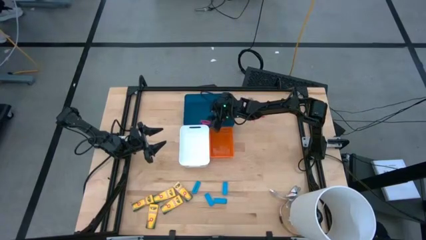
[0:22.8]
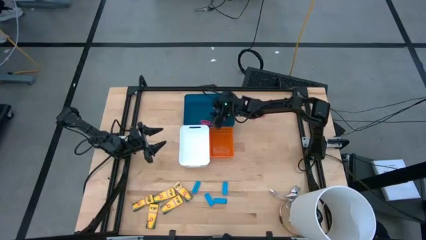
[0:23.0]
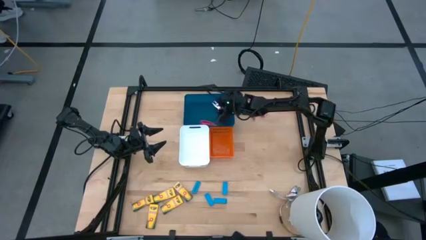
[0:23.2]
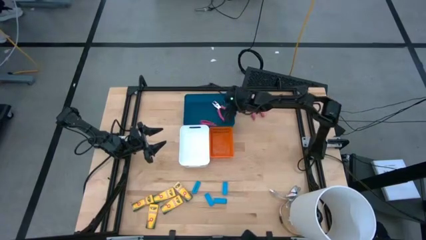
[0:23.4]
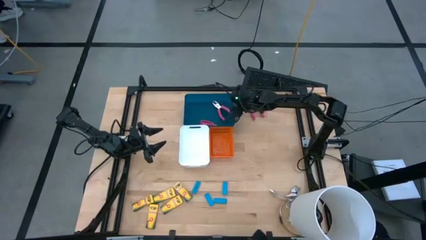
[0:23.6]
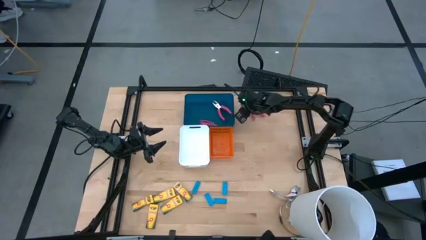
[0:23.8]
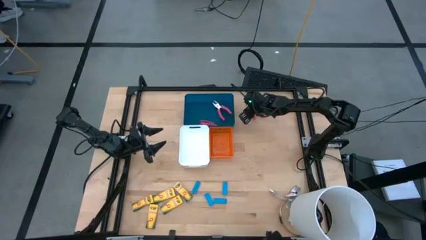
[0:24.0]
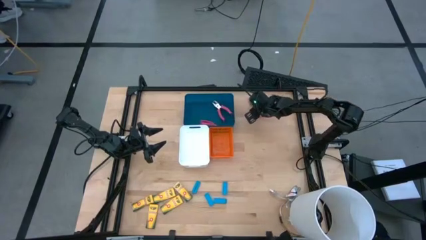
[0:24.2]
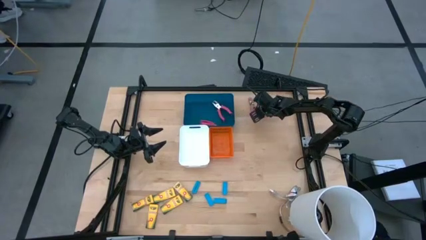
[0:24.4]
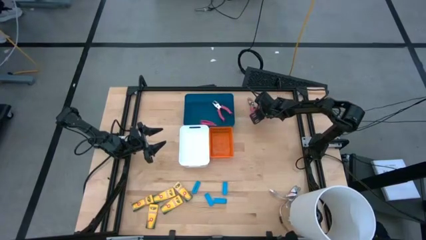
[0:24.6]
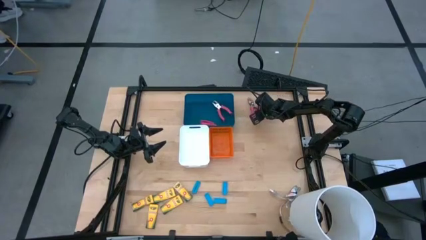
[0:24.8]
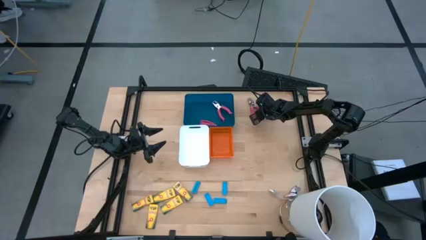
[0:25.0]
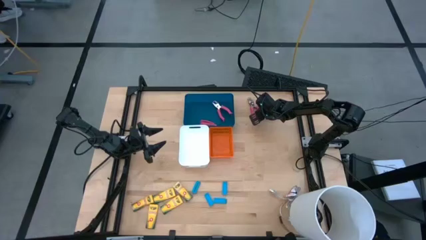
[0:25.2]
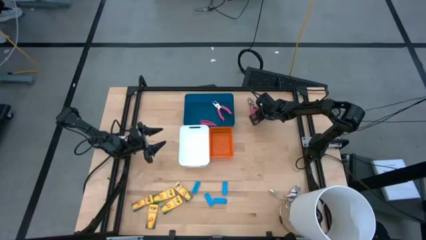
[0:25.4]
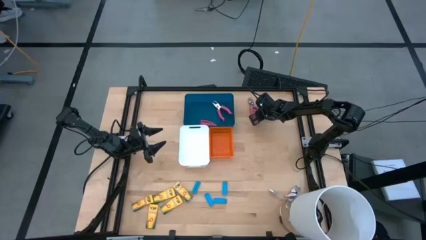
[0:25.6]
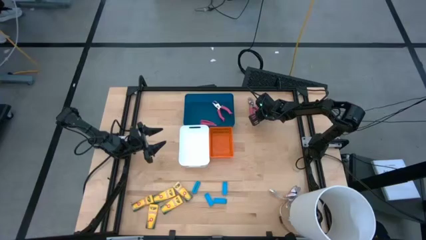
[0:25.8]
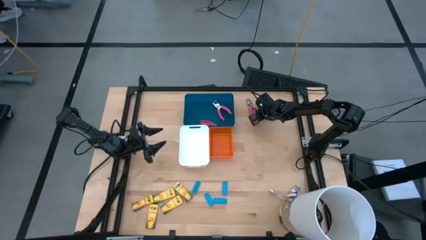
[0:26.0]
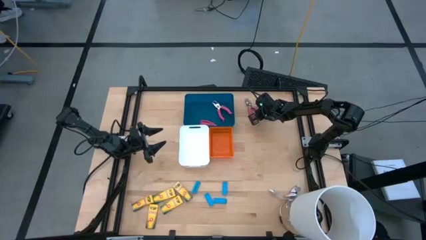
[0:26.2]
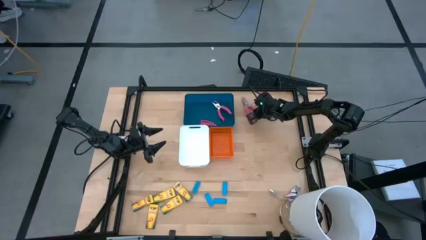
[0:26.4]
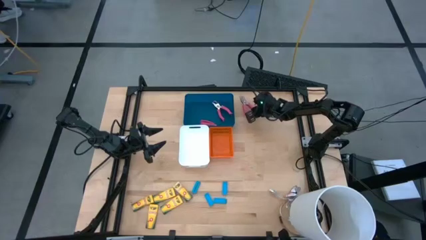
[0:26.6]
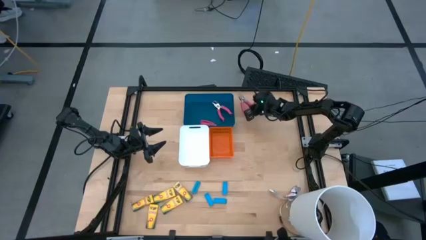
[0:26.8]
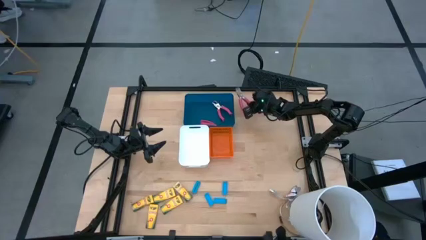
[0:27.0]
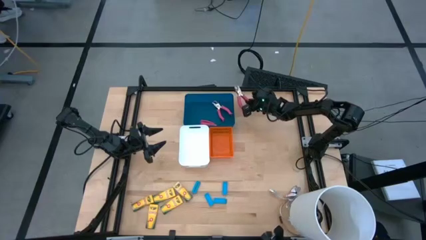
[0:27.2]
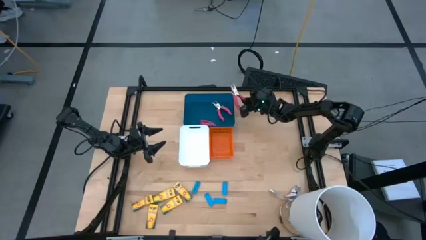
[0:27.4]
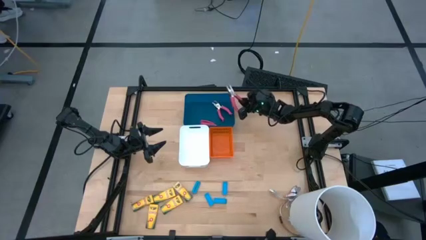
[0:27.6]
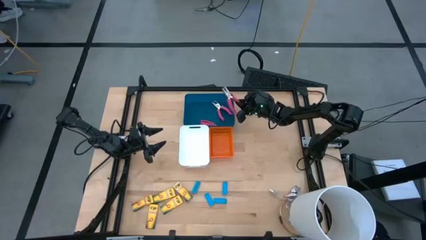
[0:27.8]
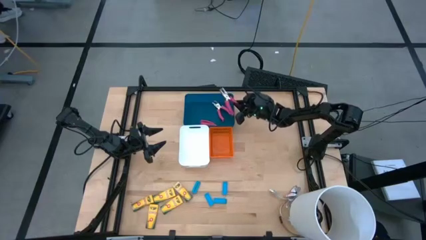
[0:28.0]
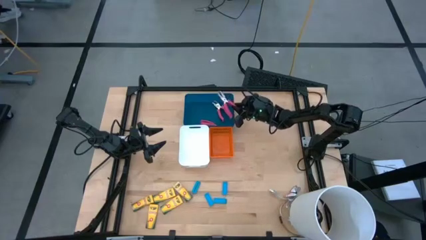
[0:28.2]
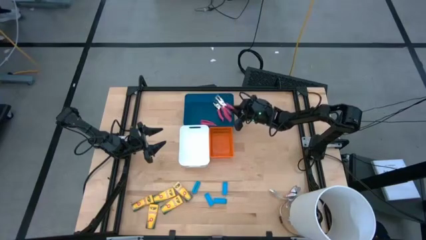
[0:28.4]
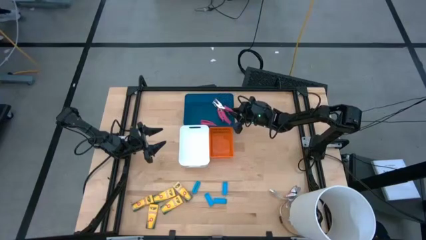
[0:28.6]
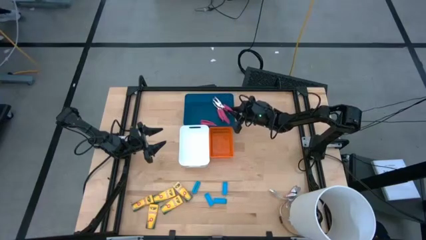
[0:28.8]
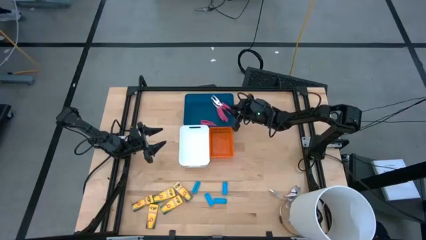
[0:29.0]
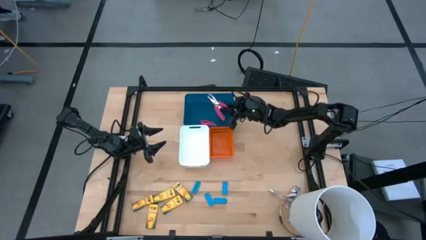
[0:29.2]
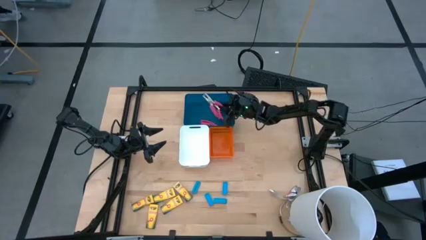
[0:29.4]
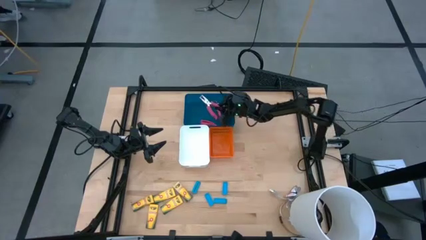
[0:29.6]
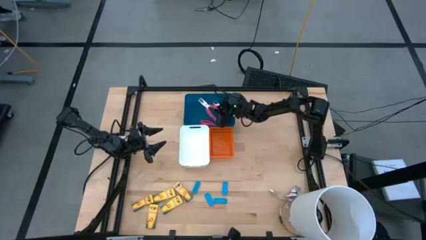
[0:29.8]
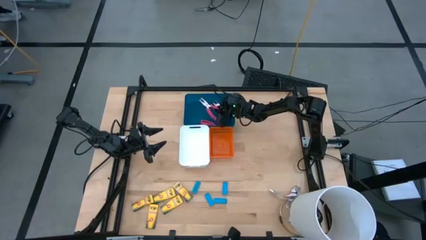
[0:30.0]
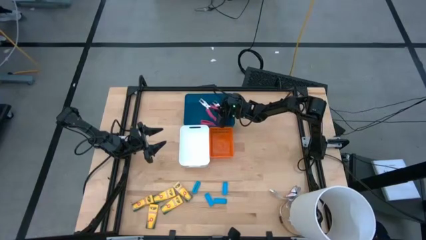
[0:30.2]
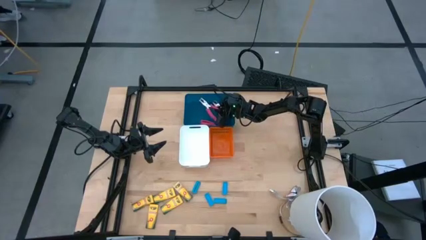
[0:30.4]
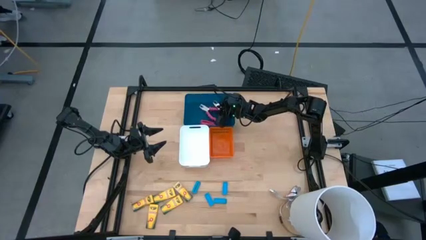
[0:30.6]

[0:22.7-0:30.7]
Task: Pick & Place School Supplies
Put the pink hole puncher into the blue bin

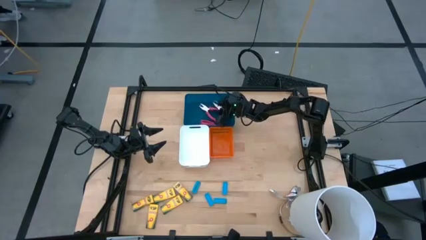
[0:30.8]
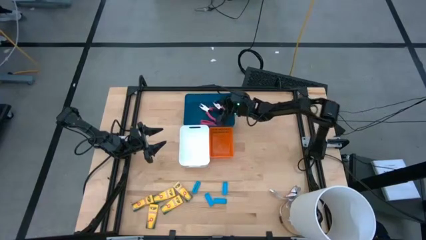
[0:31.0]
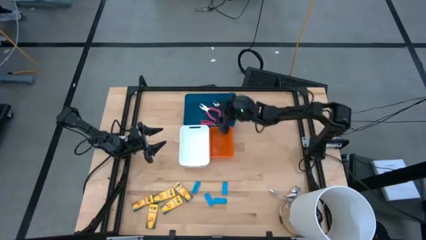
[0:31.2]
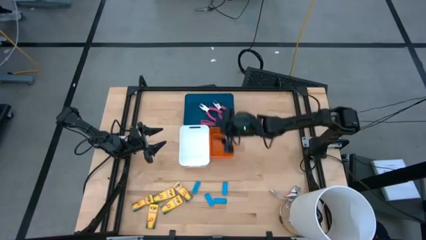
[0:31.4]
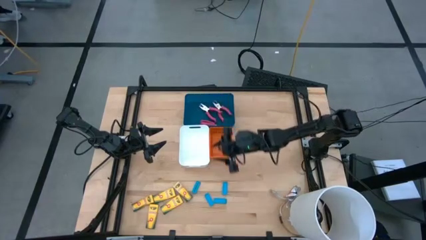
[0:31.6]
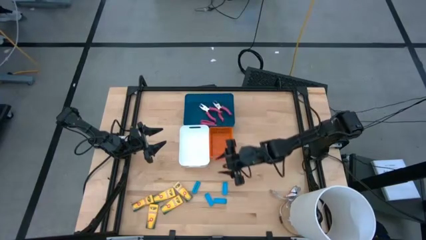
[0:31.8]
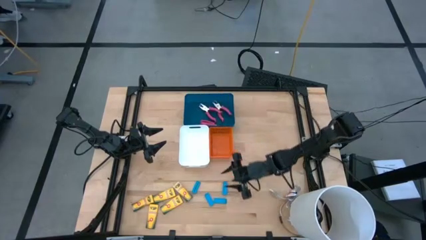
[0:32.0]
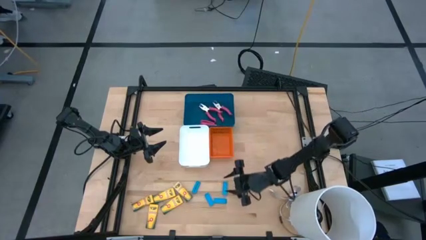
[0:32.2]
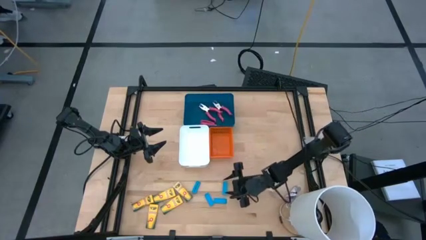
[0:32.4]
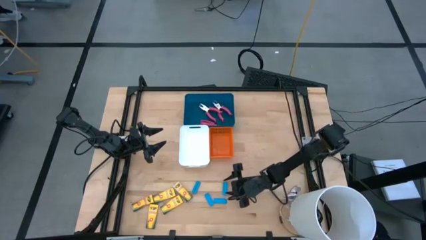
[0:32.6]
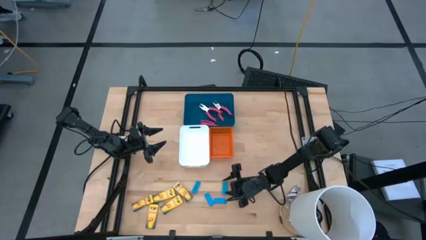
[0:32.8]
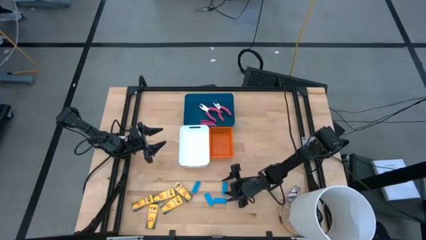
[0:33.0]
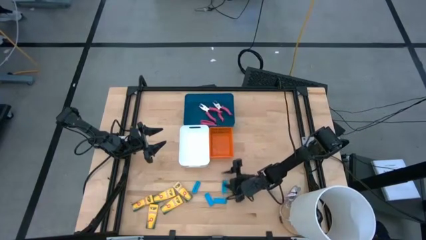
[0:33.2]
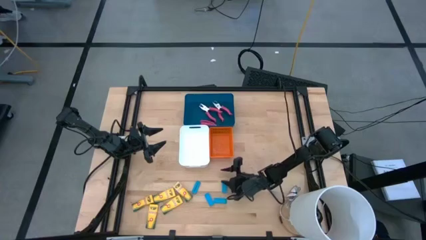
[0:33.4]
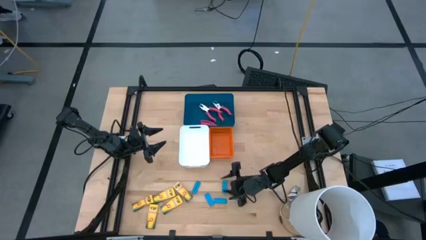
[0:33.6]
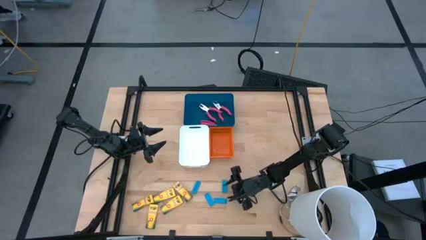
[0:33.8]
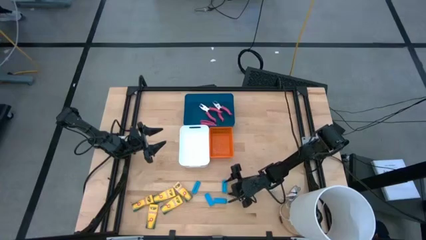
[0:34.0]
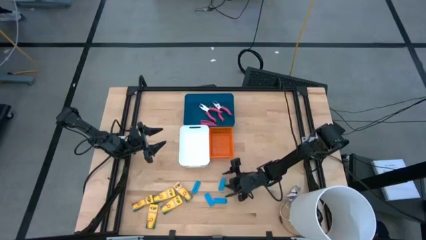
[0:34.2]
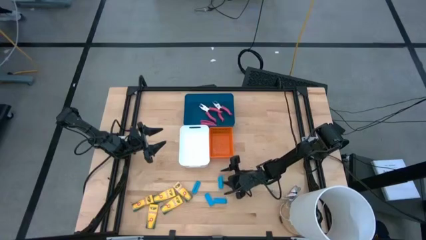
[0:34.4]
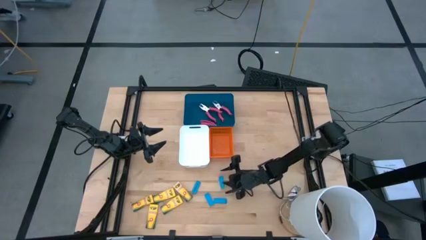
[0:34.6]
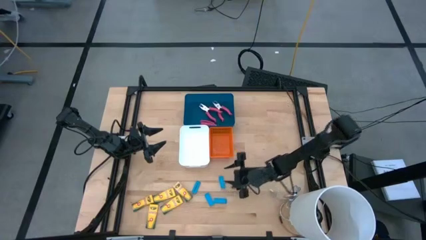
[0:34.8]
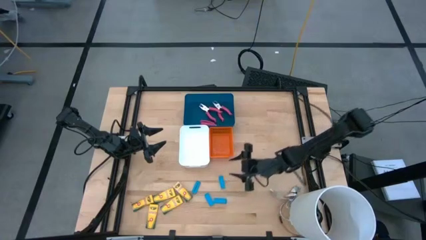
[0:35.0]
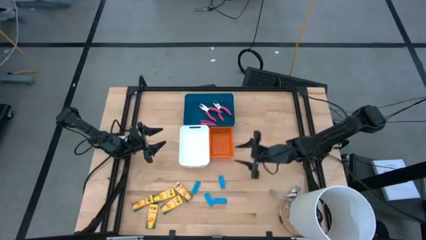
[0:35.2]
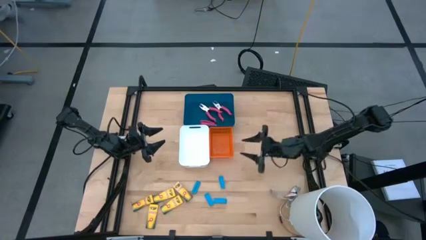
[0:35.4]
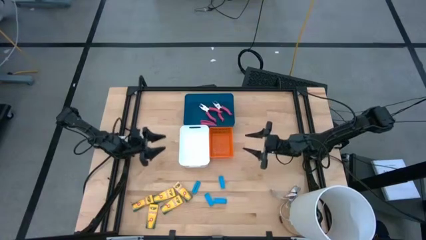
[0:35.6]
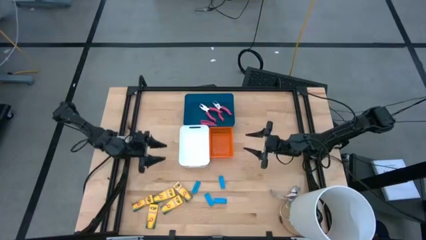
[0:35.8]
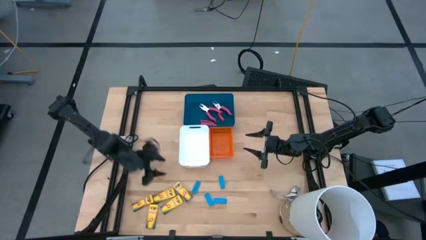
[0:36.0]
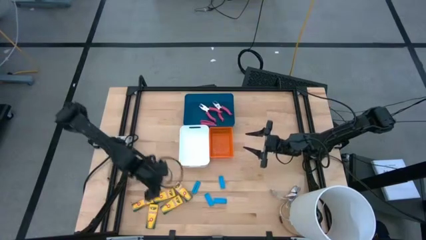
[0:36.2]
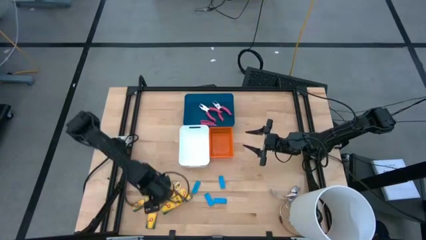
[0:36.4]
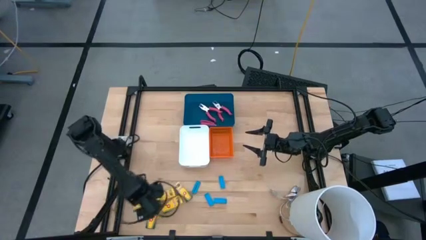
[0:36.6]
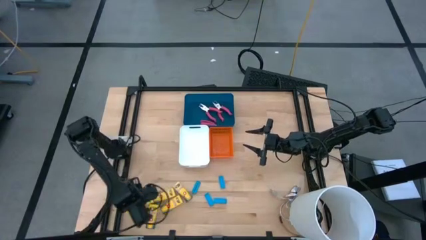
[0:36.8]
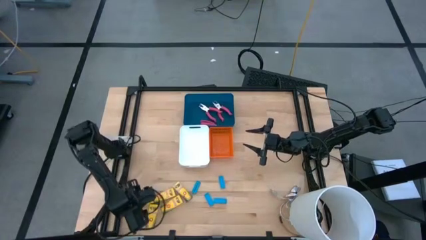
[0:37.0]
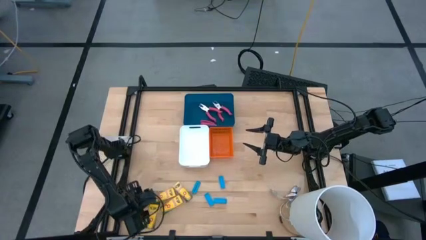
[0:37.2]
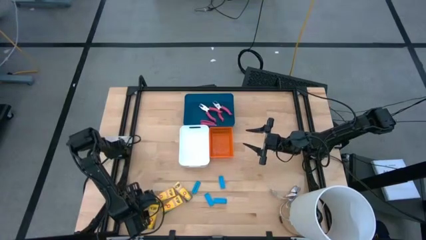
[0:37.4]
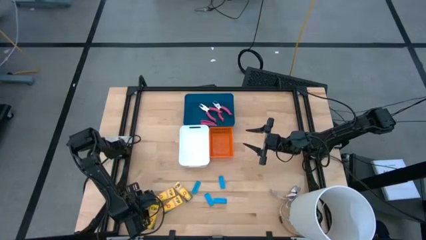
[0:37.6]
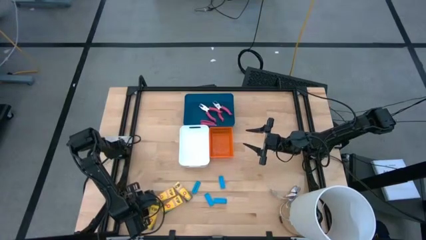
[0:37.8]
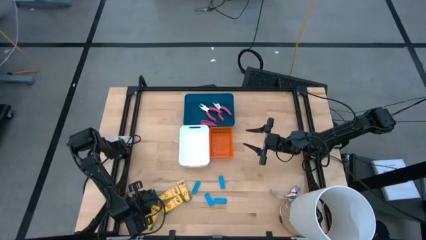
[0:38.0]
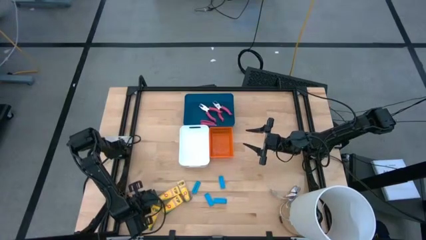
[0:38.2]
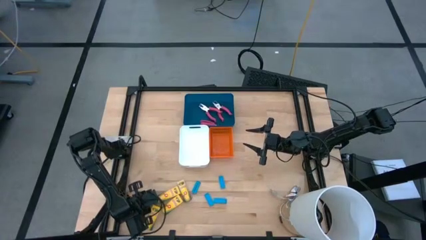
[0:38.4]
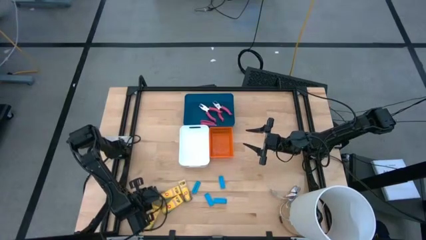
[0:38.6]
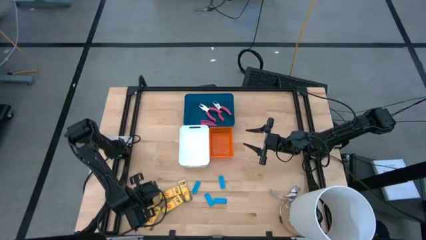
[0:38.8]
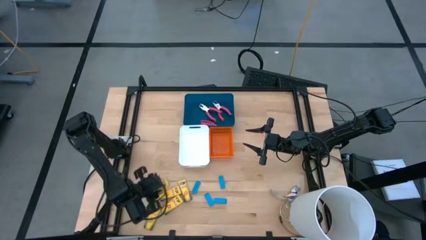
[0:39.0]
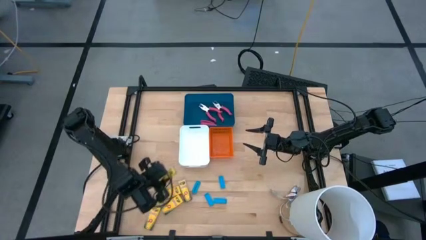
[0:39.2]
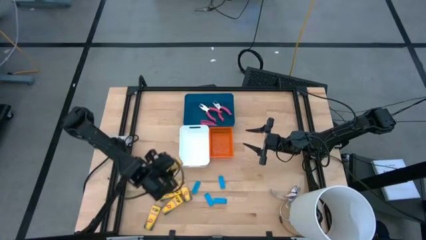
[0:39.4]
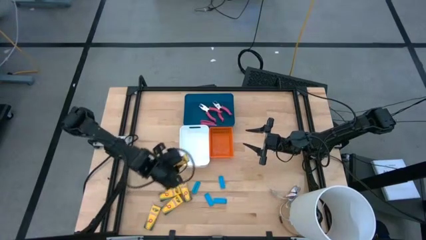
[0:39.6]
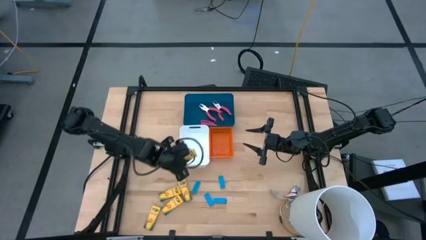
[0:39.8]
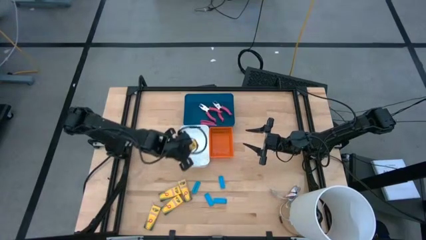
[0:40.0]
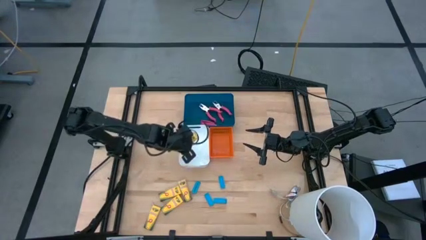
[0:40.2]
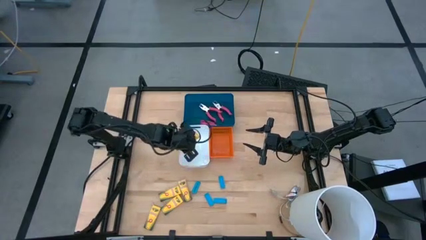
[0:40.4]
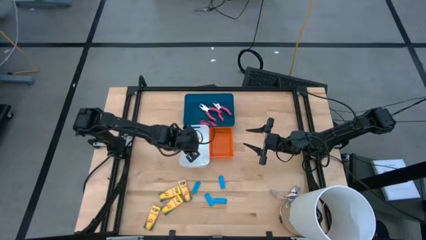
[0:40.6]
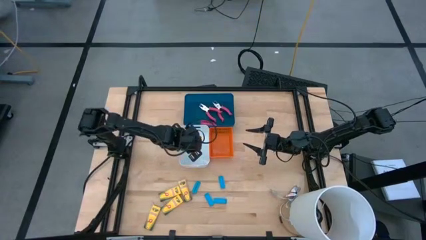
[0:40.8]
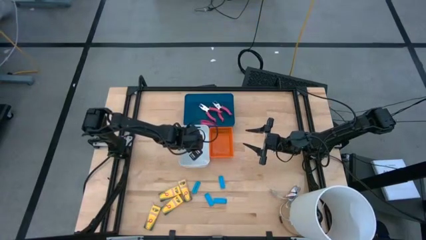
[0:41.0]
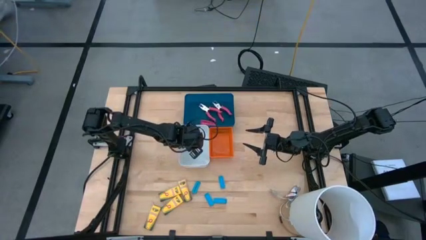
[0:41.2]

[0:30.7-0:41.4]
Put the yellow crayon box into the white bin
